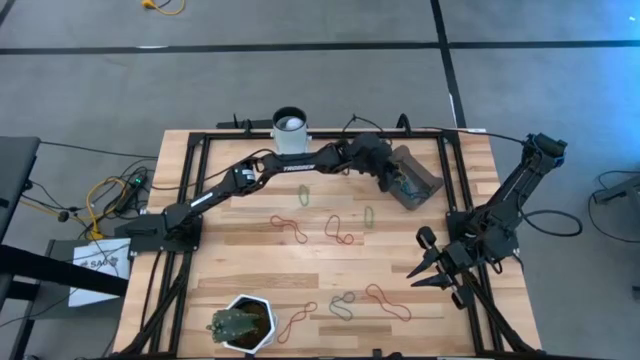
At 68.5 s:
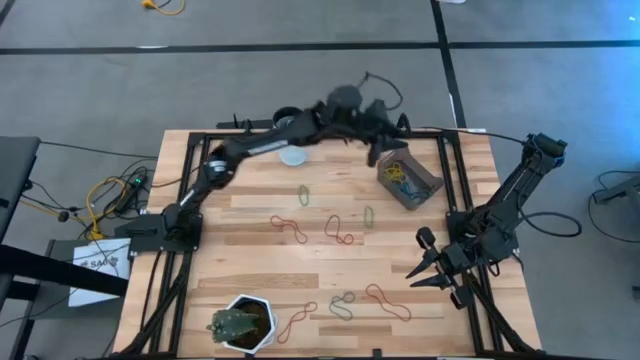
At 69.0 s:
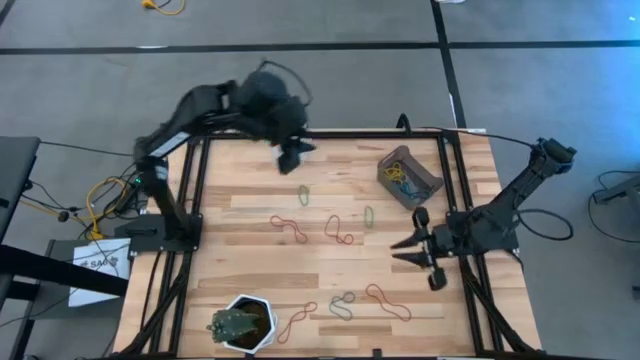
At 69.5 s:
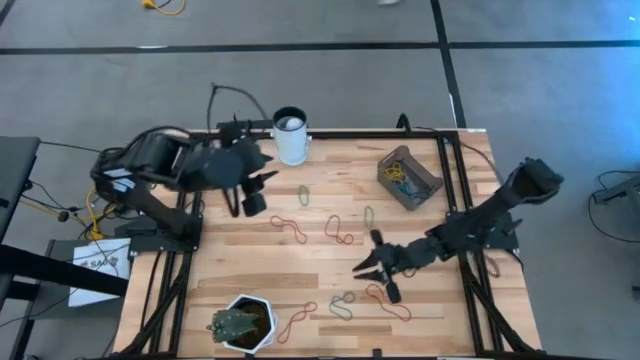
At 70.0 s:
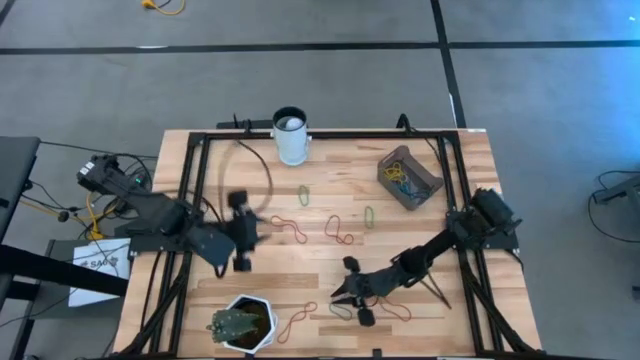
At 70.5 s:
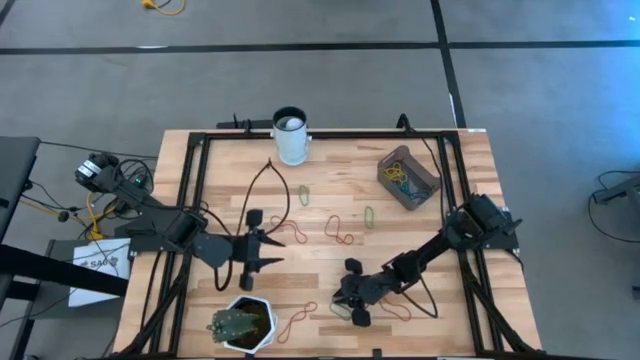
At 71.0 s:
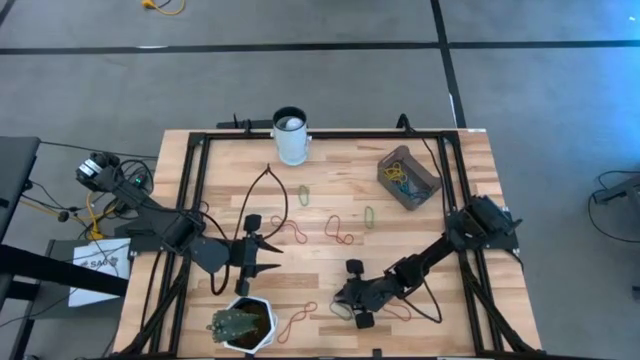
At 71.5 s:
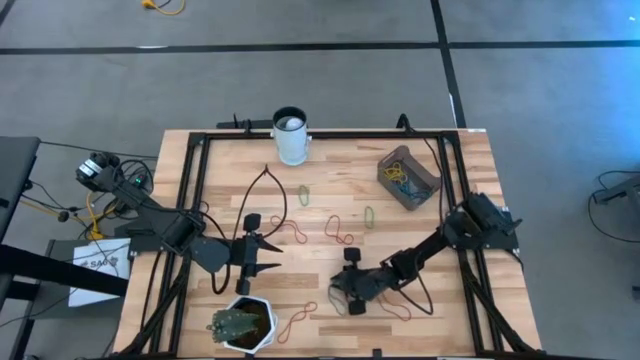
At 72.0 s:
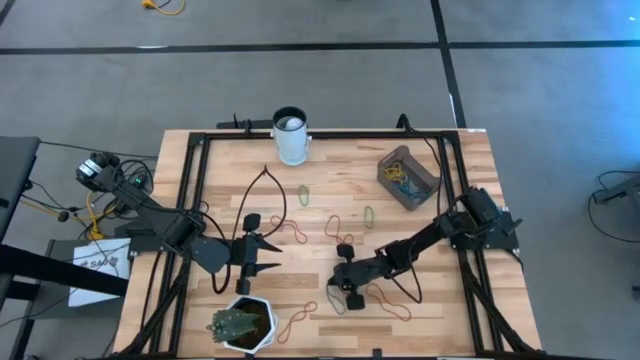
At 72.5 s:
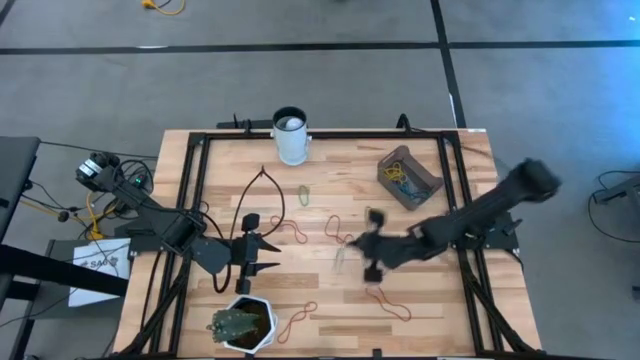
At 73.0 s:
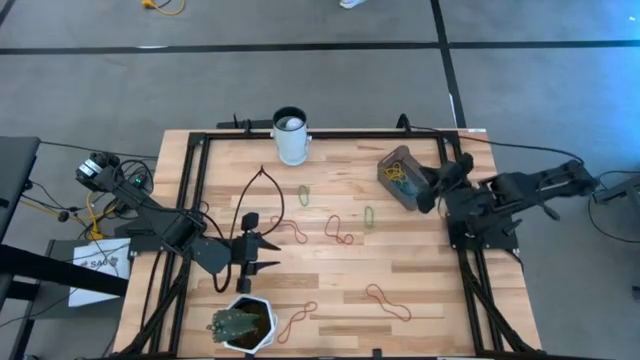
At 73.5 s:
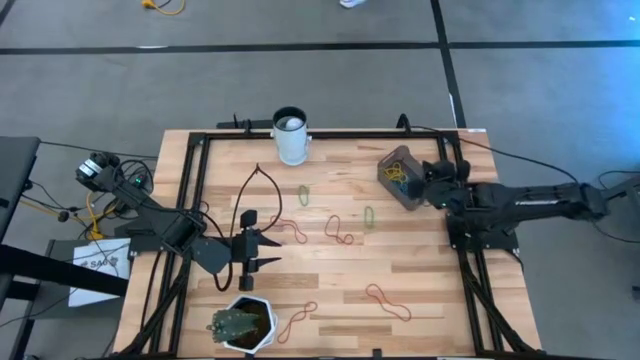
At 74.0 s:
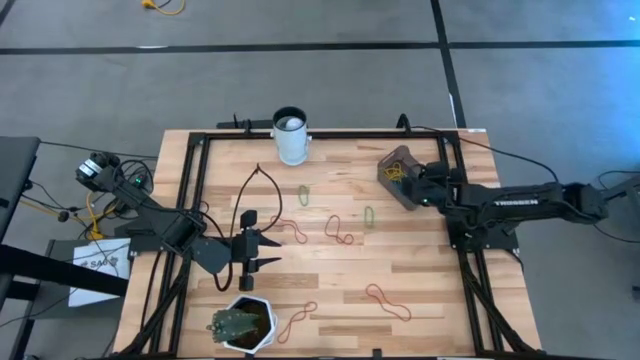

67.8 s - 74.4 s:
Task: Pick and place items into bin
Put the blue rubber band into the bin

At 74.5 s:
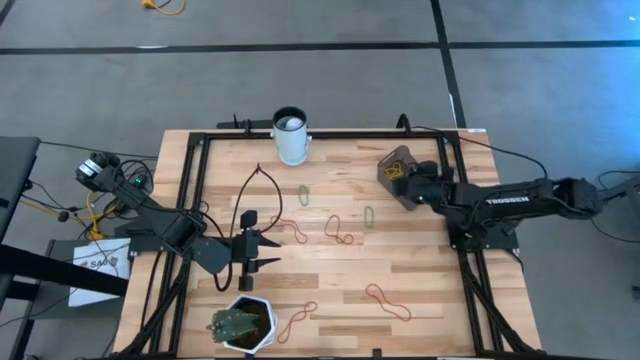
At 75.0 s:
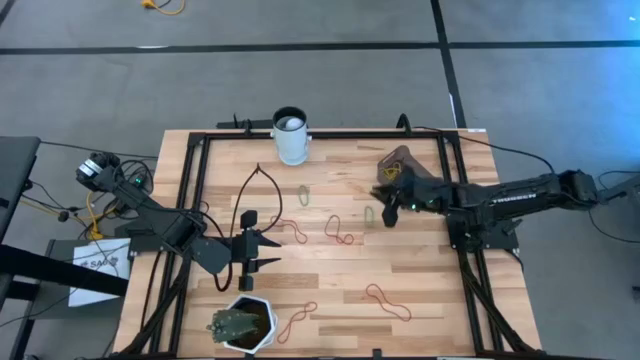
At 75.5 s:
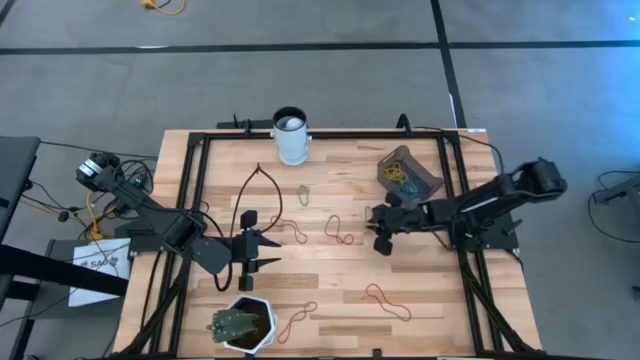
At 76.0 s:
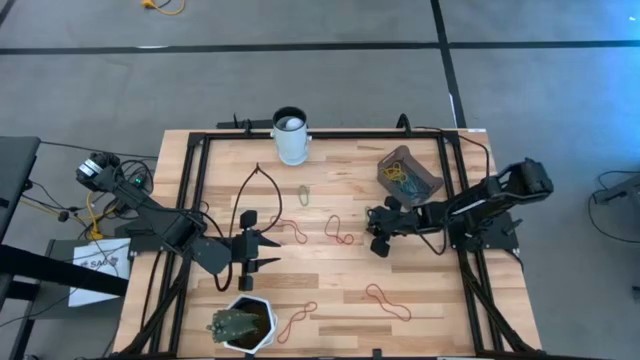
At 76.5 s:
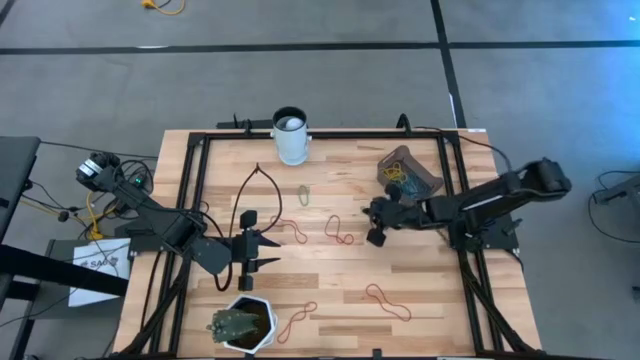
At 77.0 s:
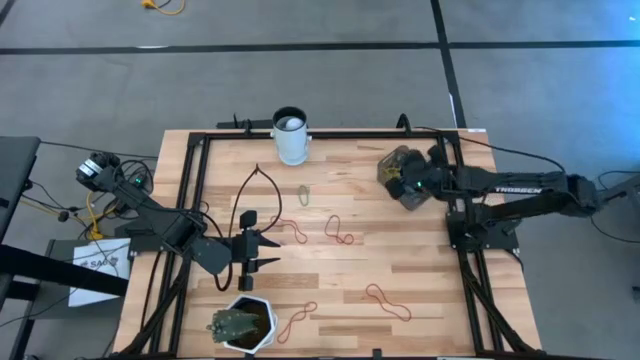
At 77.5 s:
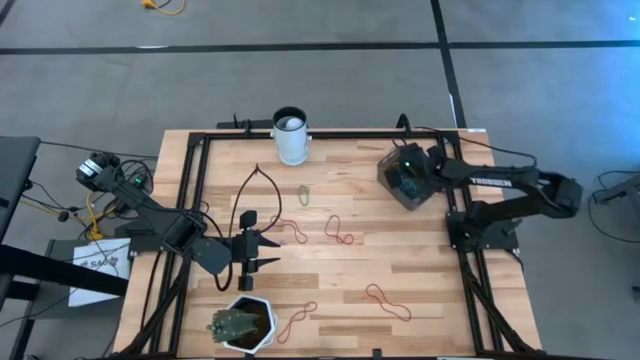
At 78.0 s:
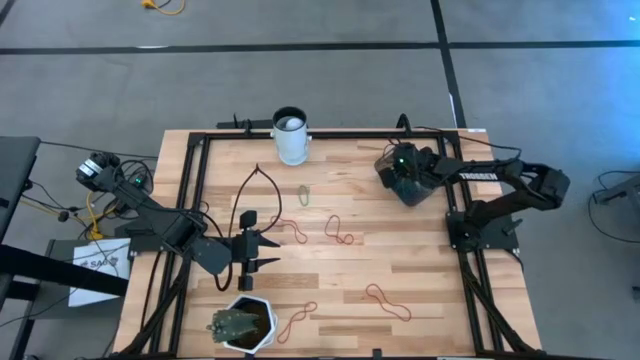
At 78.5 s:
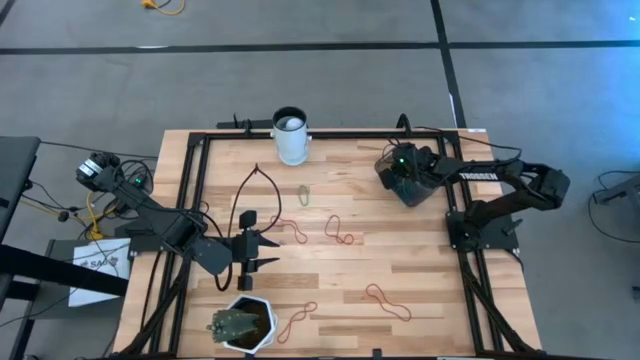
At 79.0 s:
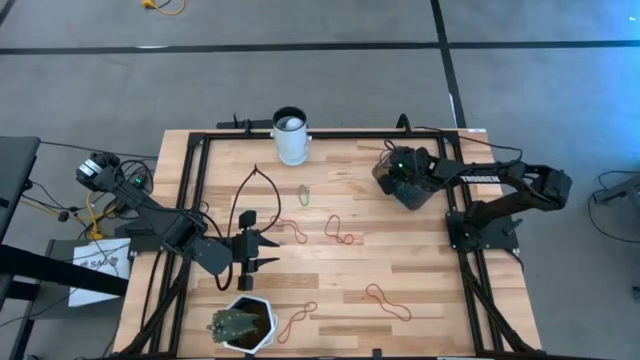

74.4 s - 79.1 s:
Put the right green rubber band into the bin

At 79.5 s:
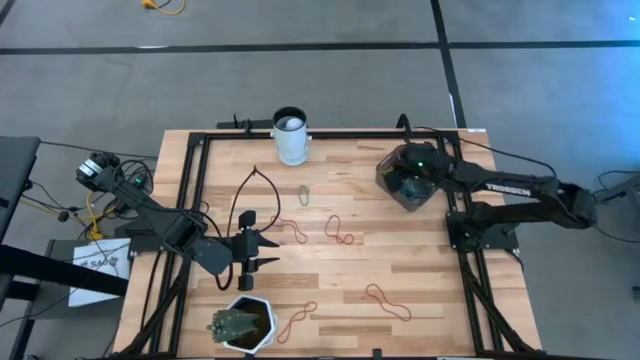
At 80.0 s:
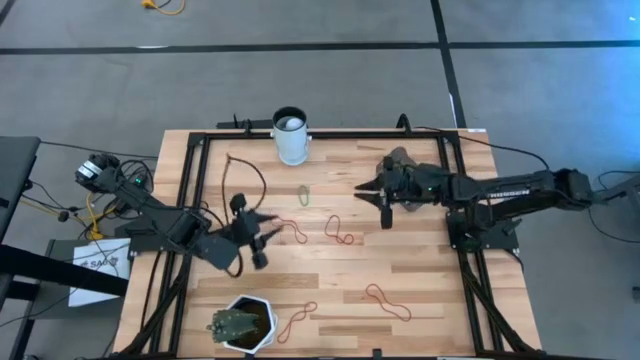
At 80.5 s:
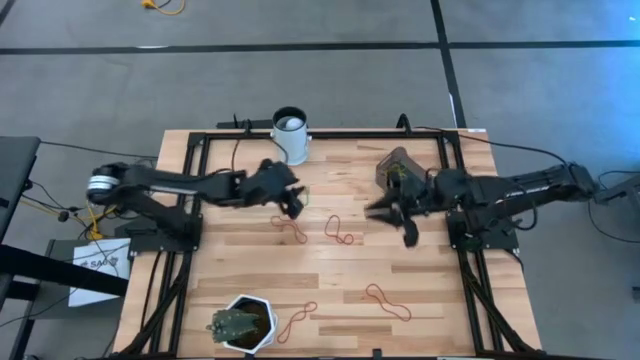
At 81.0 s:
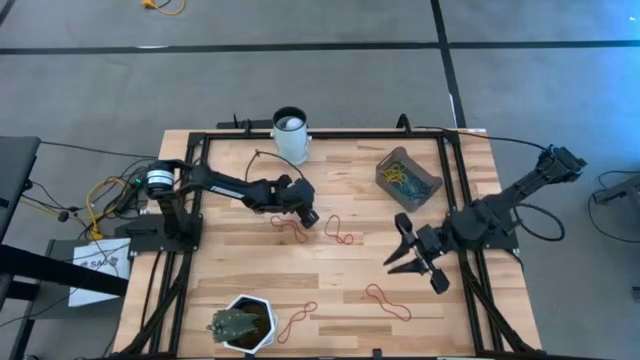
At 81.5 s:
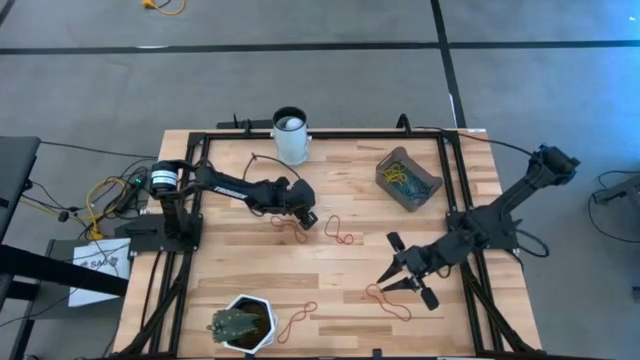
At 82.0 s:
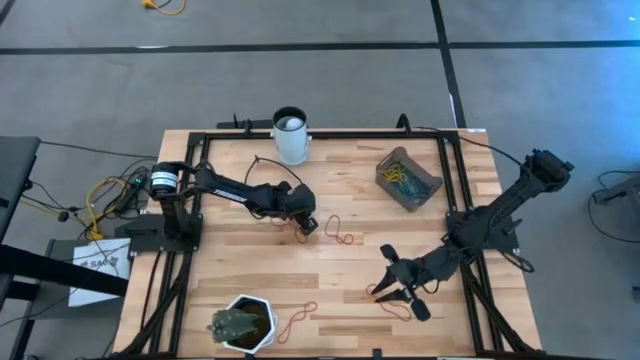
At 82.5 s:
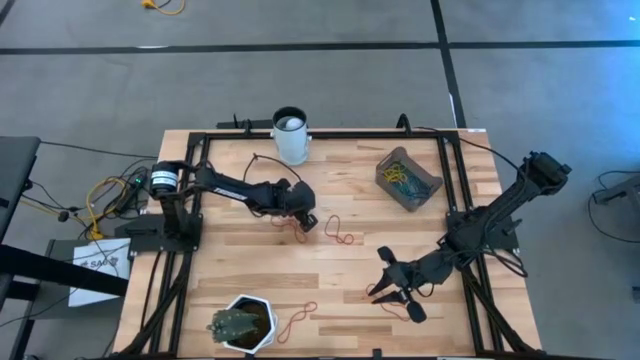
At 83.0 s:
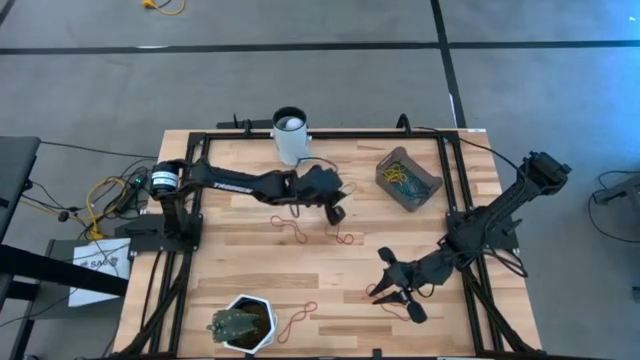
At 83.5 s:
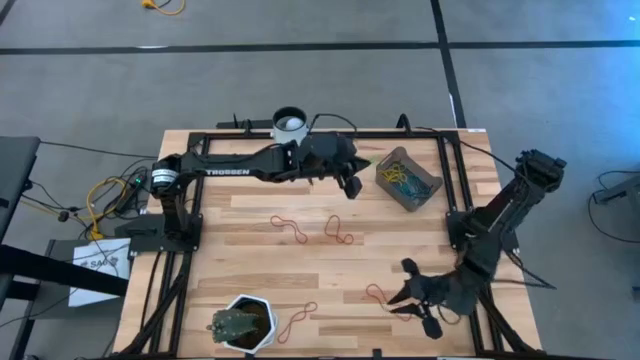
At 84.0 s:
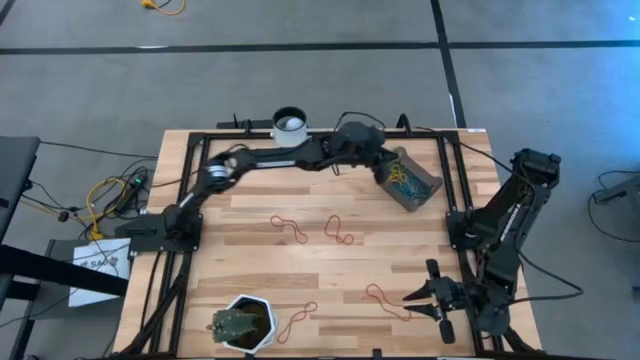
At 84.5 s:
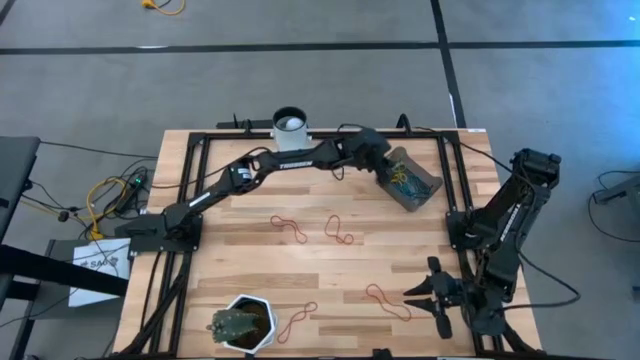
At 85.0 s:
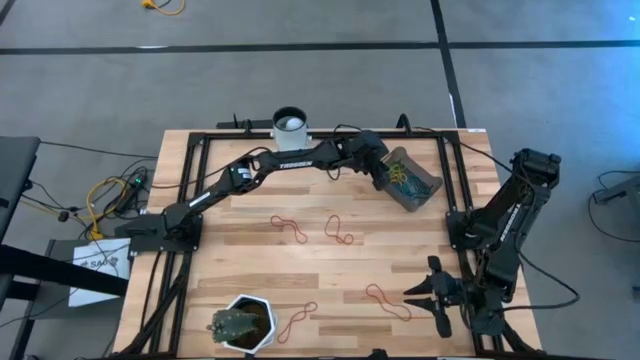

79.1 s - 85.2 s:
Put the green rubber band into the bin

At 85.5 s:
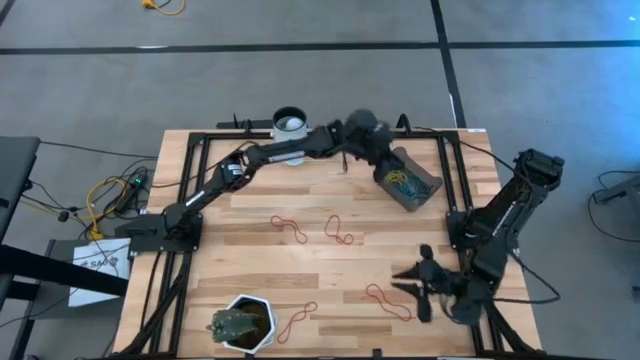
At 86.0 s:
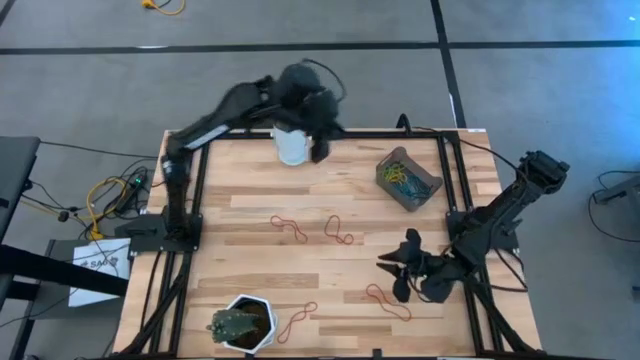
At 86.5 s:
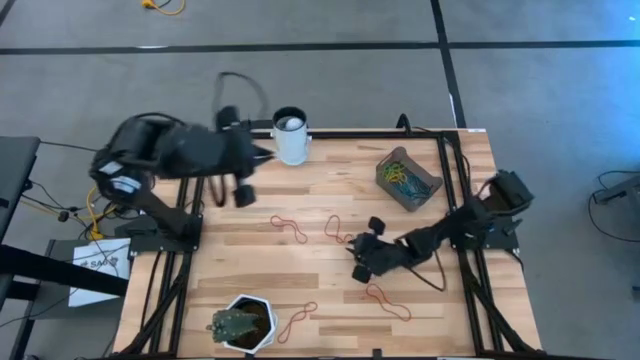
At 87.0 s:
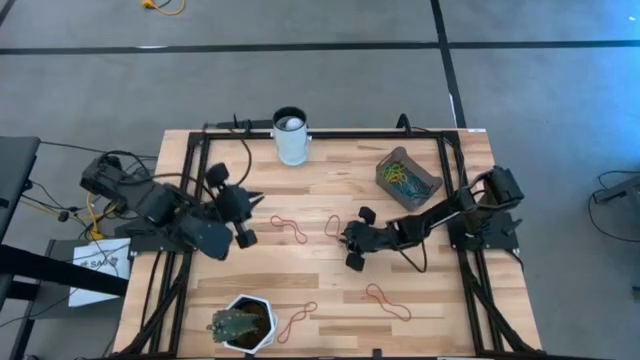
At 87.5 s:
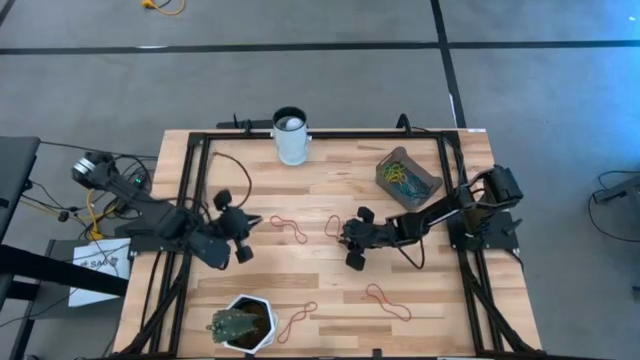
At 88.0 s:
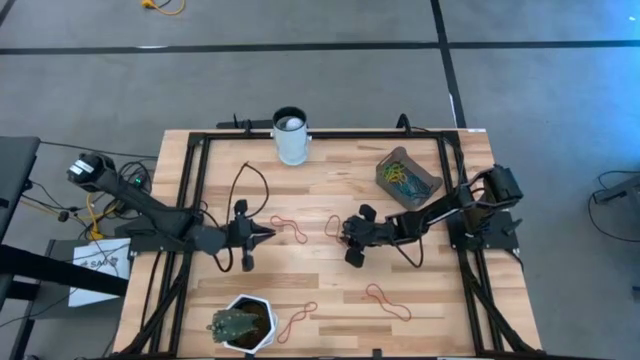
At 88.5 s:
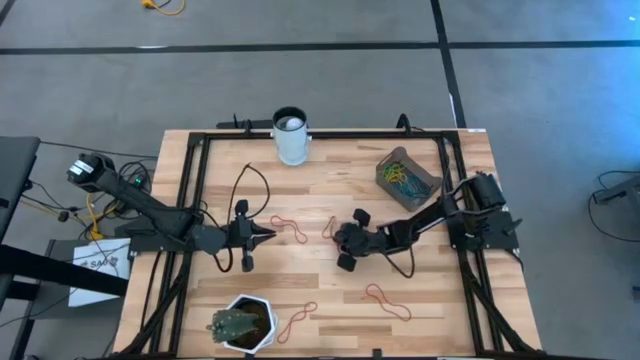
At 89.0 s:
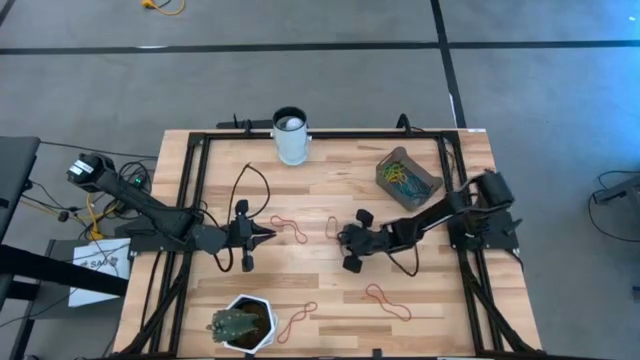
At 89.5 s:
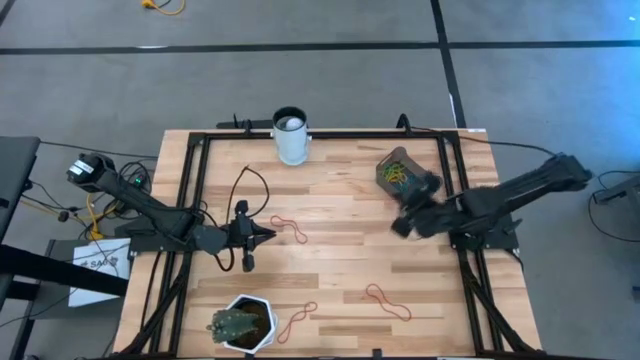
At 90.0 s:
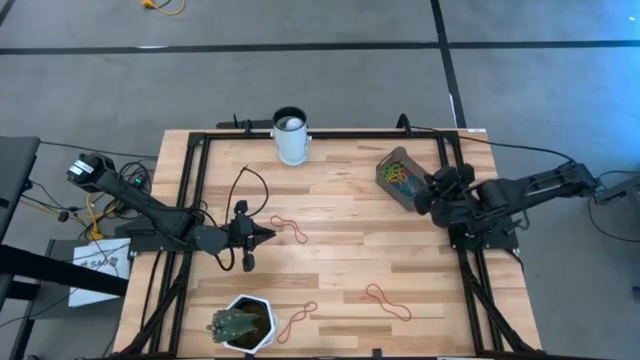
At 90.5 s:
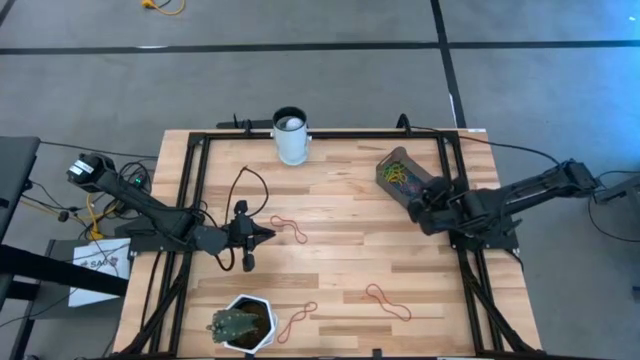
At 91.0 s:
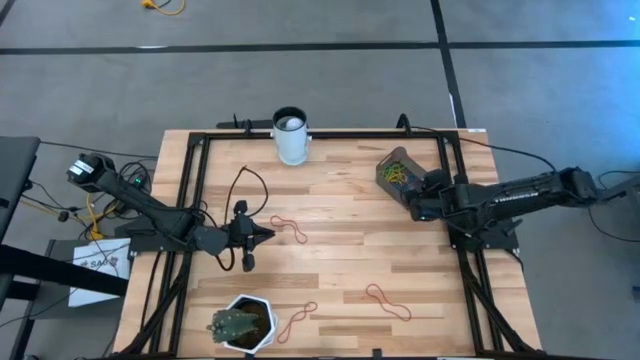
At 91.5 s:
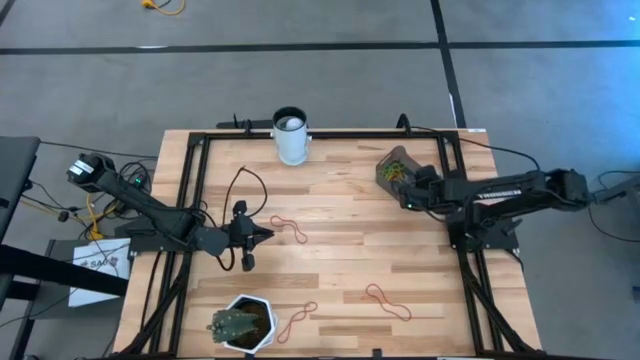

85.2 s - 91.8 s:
Put the red rubber band into the bin
